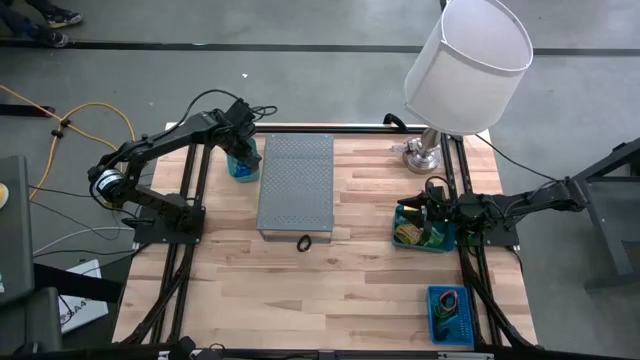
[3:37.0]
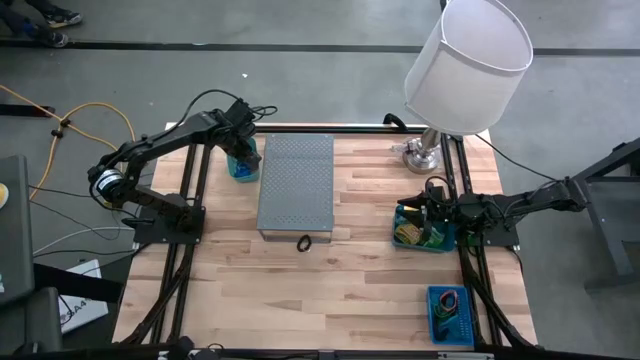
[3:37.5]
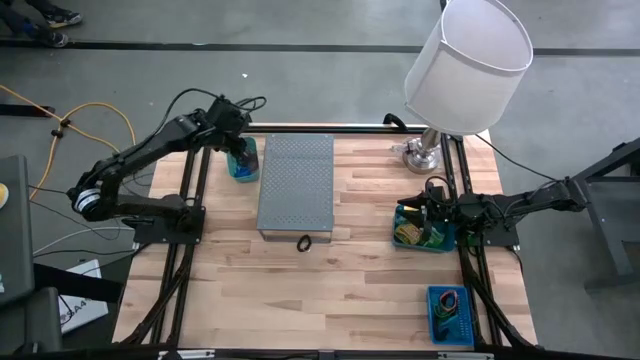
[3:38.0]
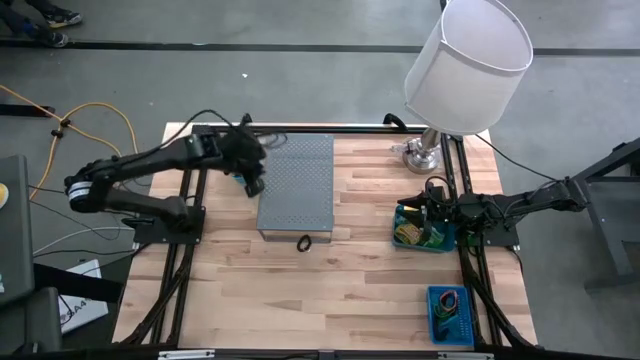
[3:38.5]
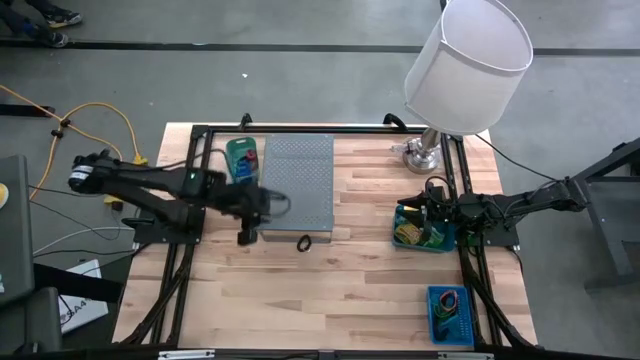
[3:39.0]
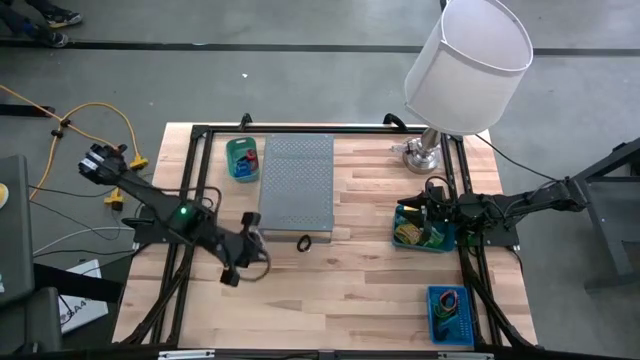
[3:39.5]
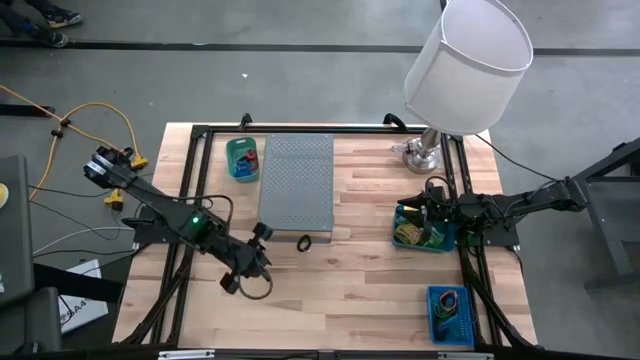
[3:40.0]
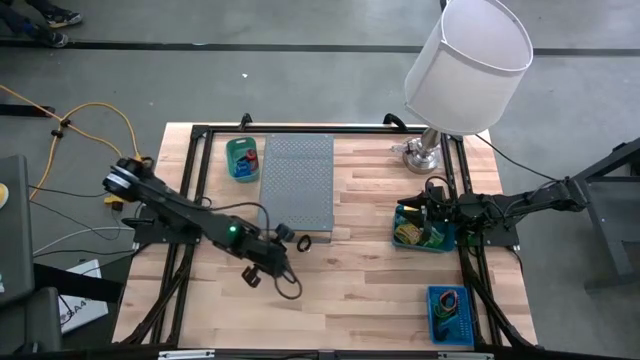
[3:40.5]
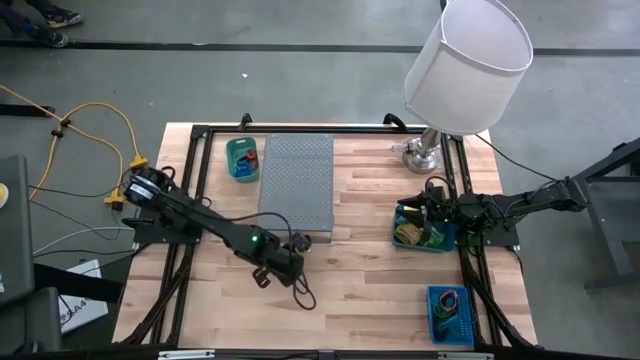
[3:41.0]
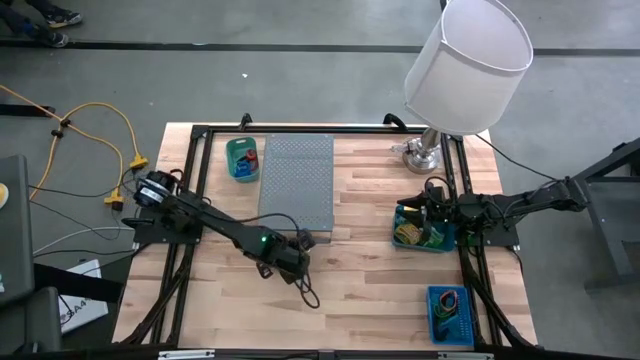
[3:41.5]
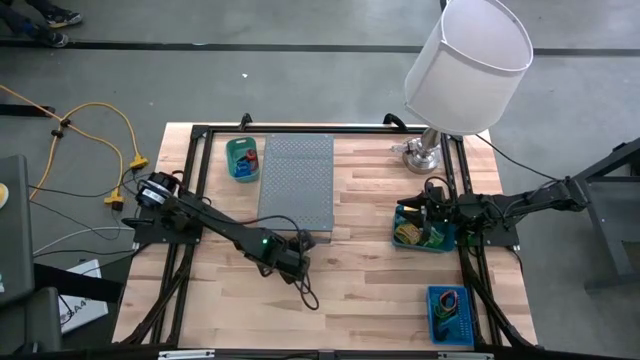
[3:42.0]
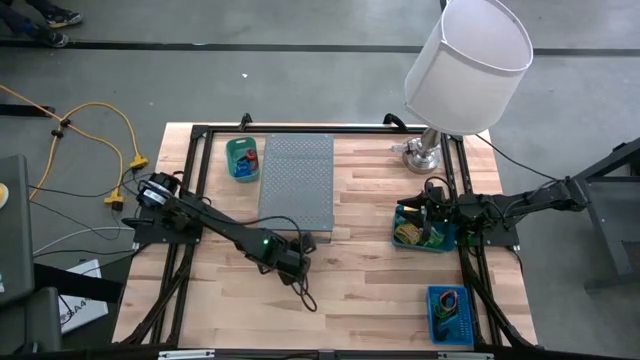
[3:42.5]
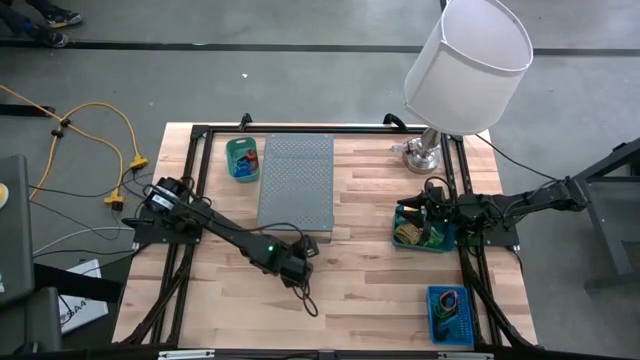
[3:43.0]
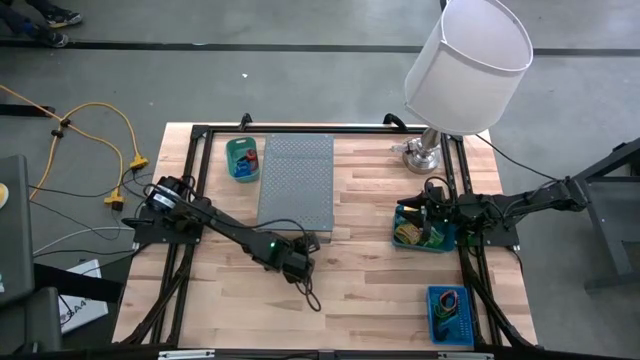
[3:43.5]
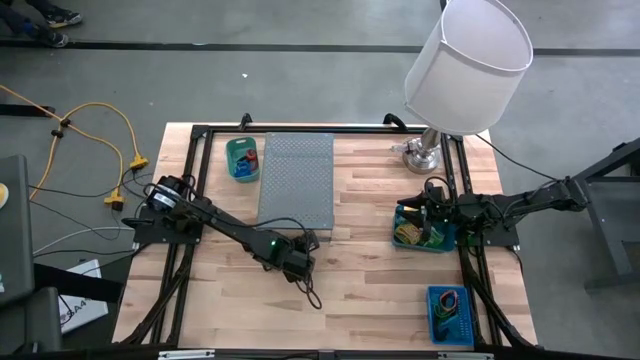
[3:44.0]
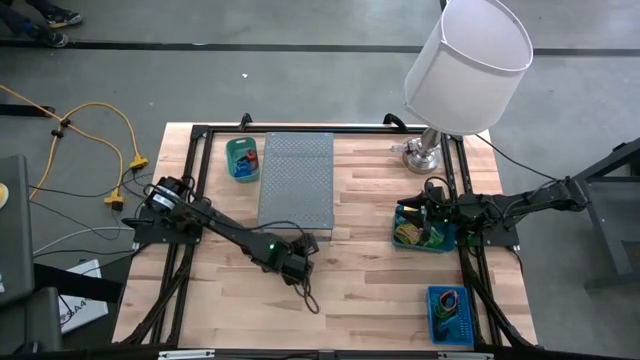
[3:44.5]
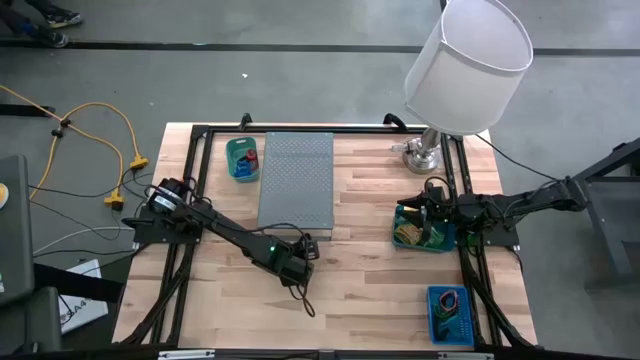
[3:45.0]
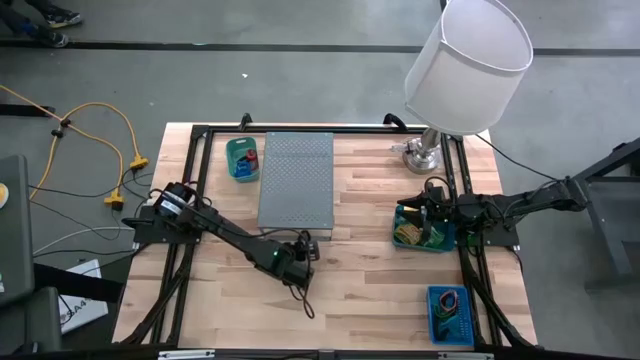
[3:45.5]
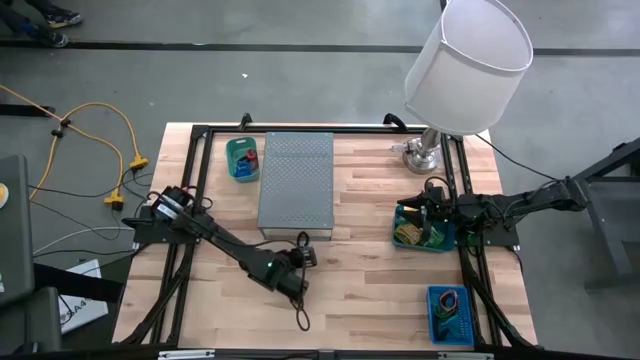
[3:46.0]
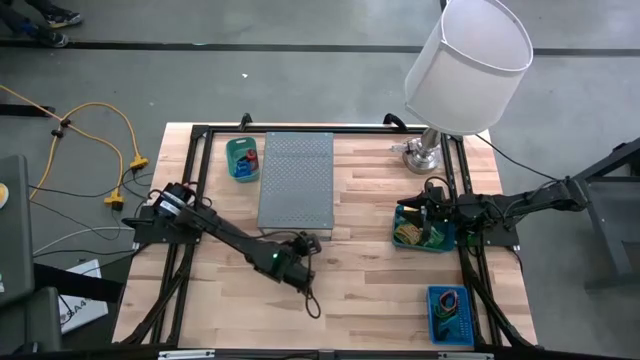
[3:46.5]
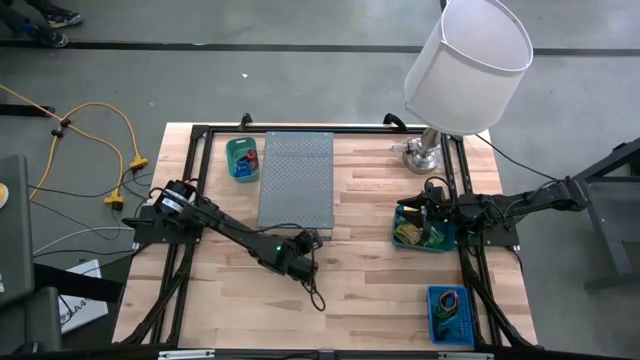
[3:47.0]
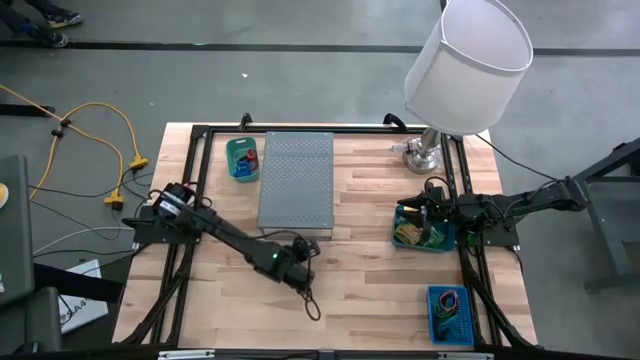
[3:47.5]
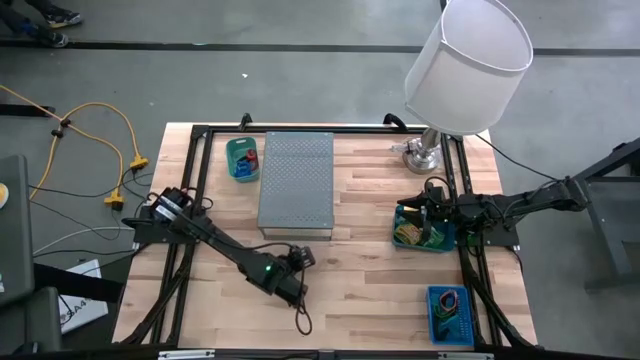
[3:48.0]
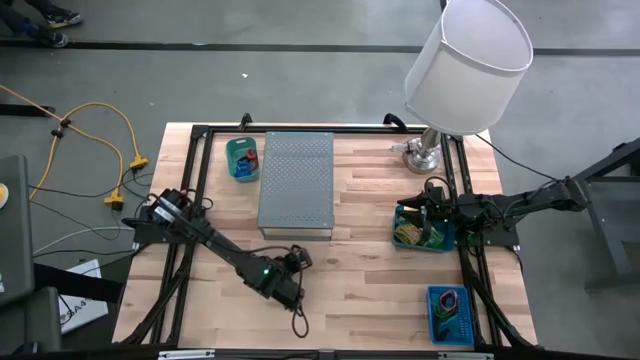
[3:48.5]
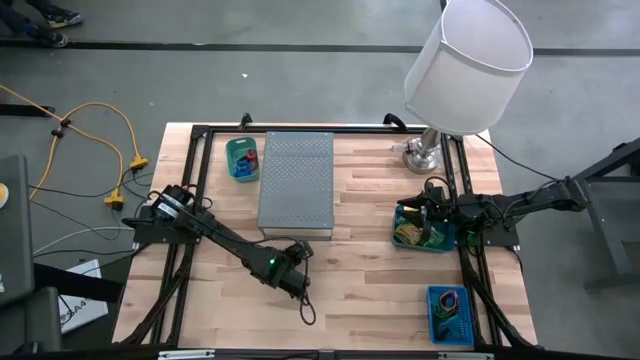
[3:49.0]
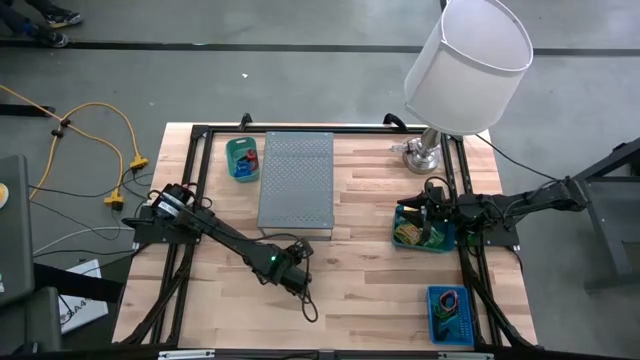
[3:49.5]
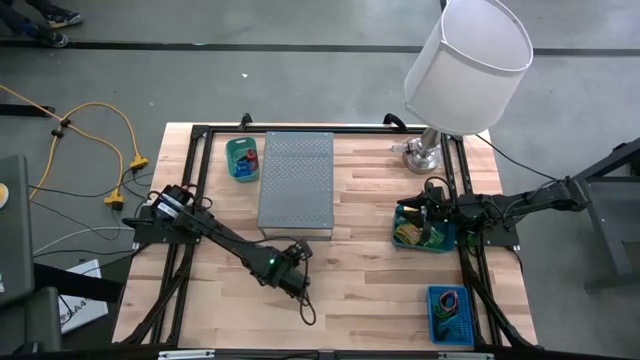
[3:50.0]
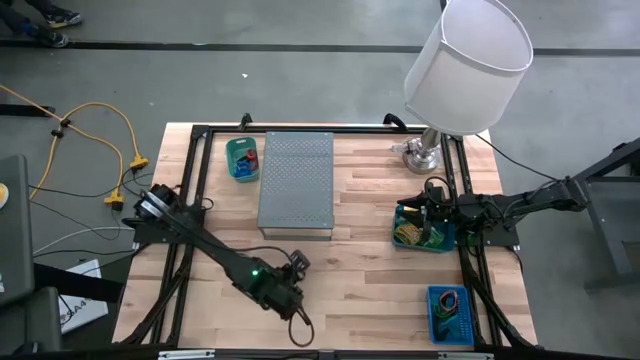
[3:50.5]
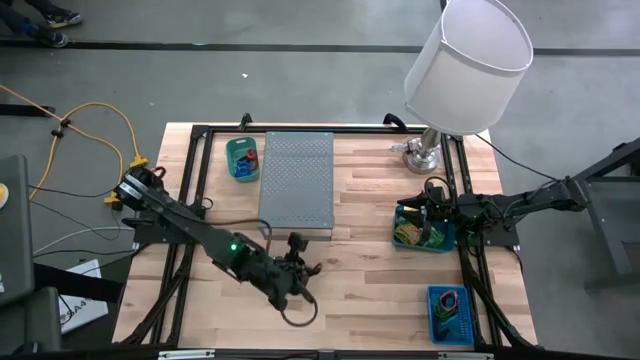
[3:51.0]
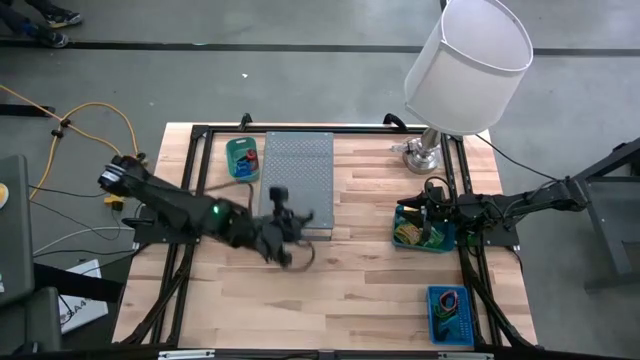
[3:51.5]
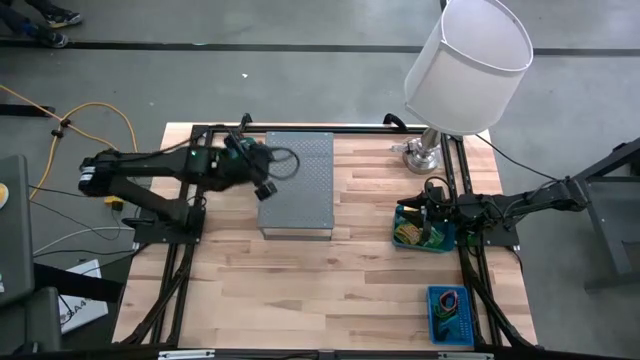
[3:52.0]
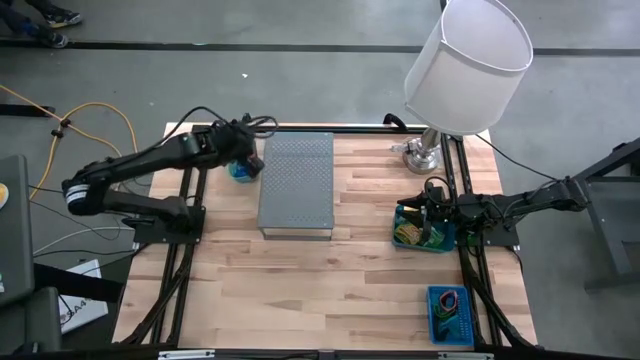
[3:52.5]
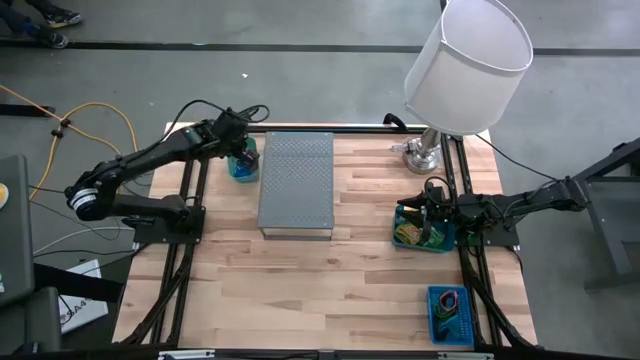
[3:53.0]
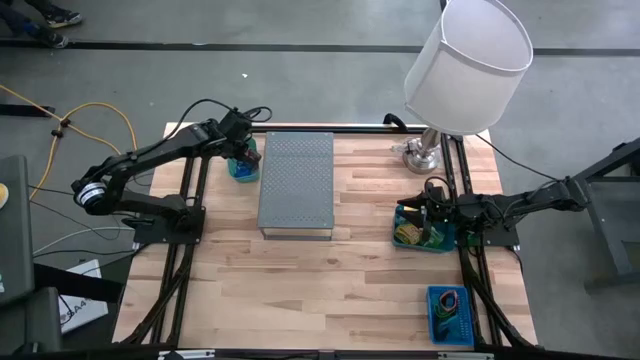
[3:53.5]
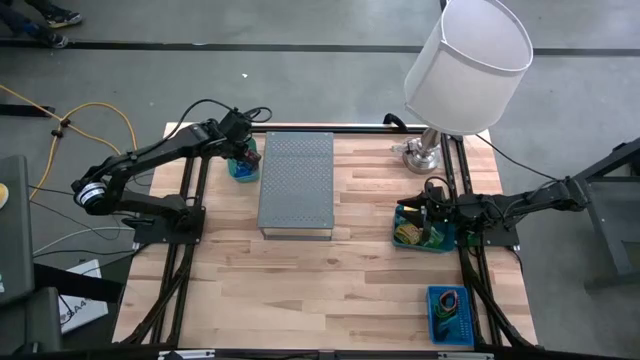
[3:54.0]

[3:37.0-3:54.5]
Task: Pick & Place Office Desk Supplies
Put the black spring keychain into the dark green bin

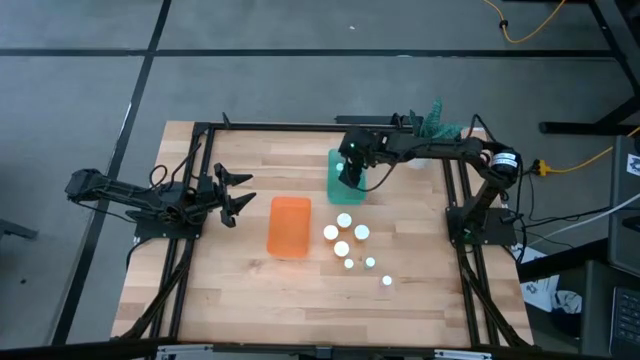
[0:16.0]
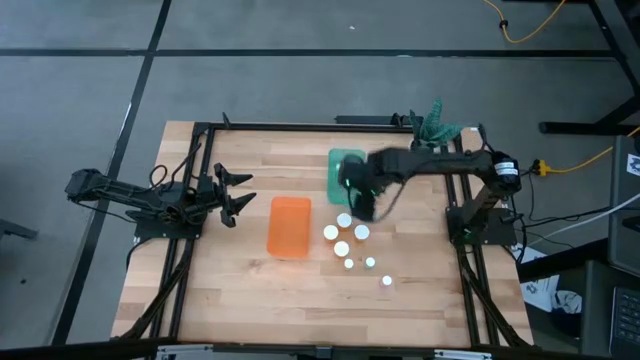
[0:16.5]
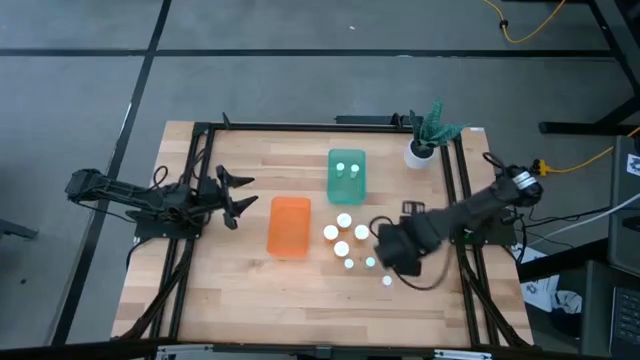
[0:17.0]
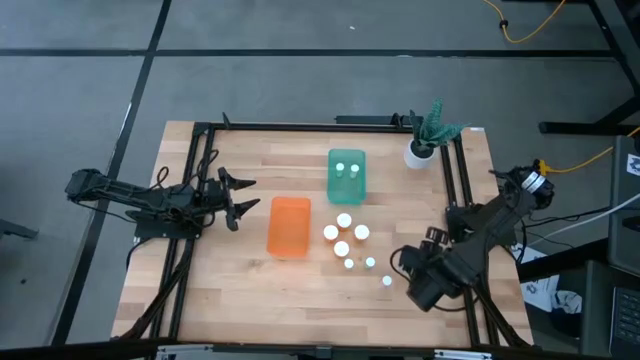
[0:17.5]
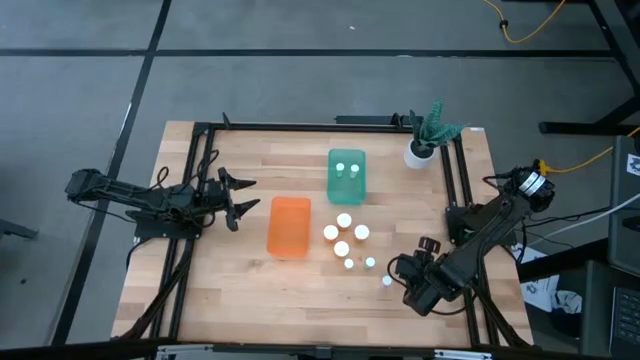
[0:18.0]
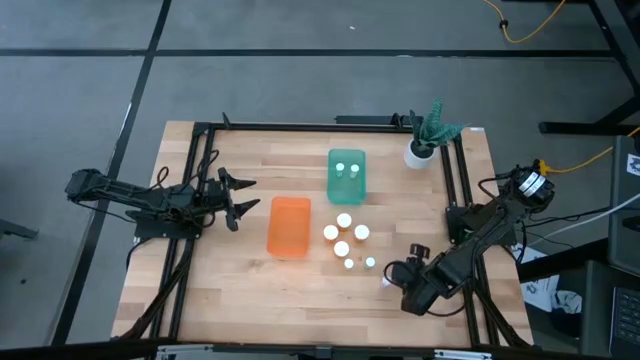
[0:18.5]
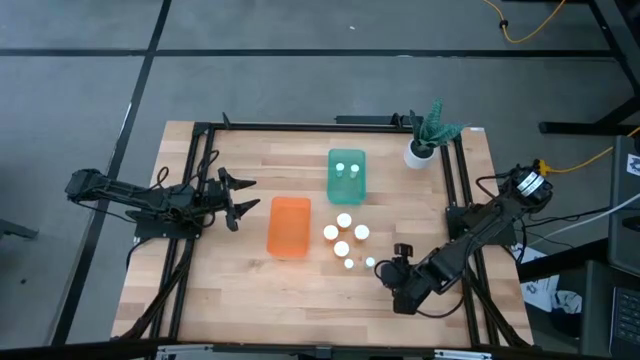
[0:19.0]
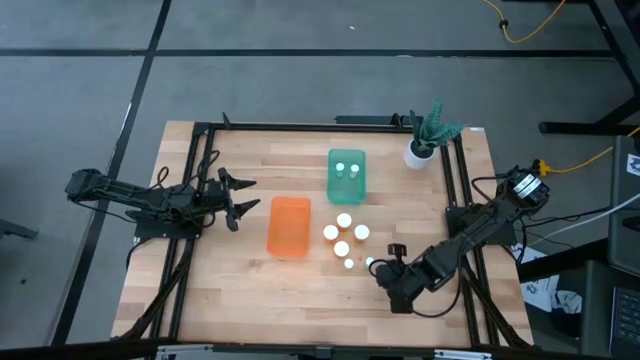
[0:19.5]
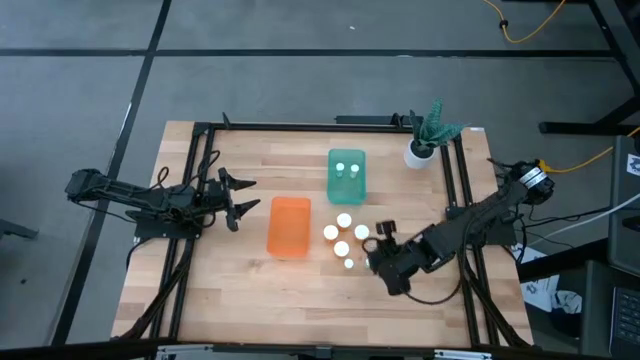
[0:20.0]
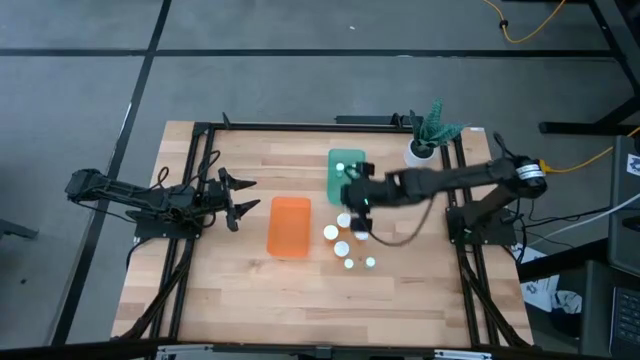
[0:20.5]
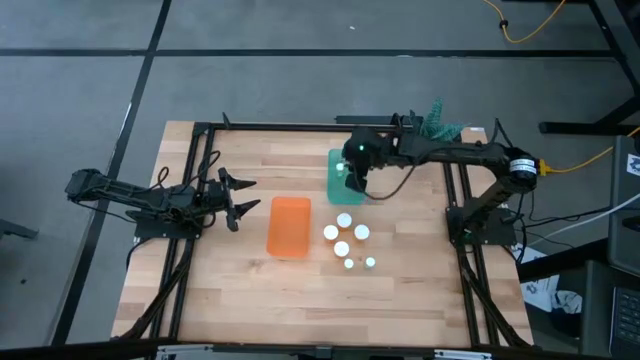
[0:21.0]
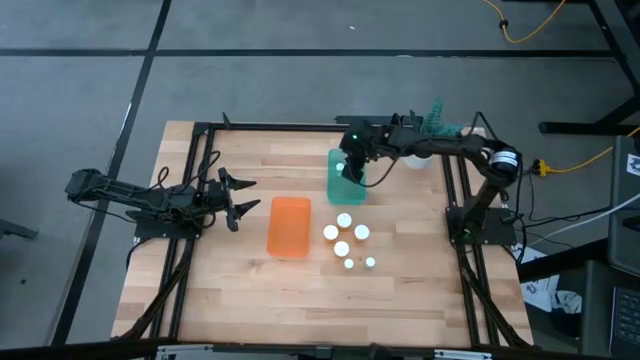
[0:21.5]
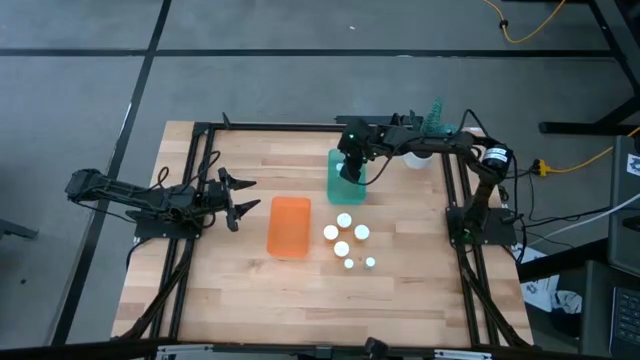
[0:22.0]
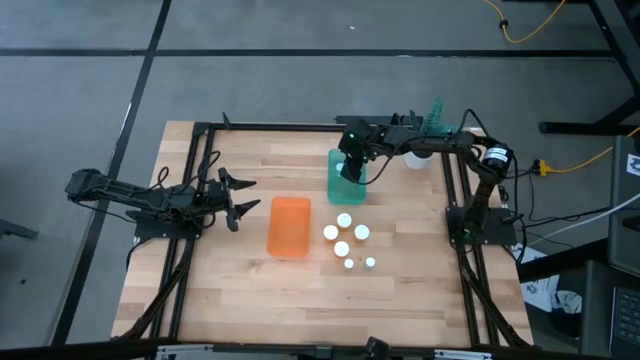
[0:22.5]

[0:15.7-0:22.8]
Task: Pick and place medicine bottles into bin by pill shape (circle, oval)
Put the small purple medicine bottle into the blue bin
